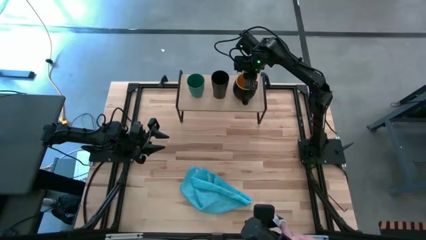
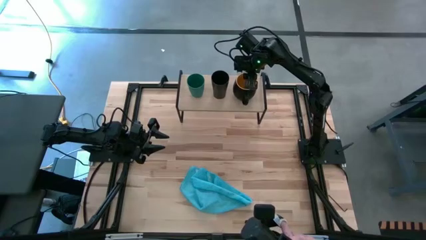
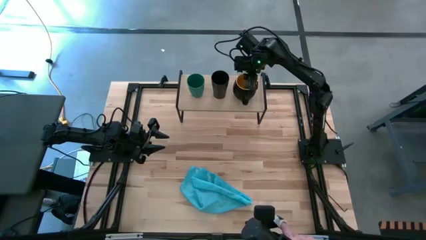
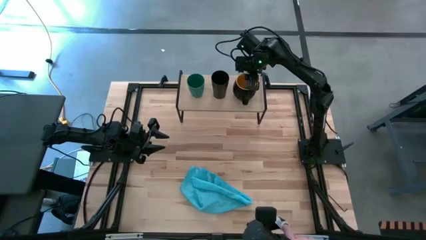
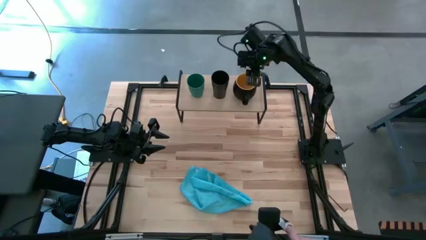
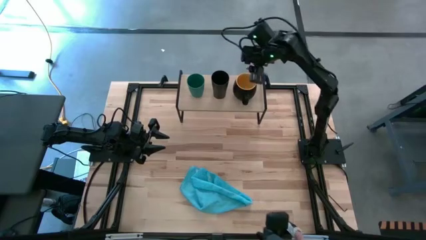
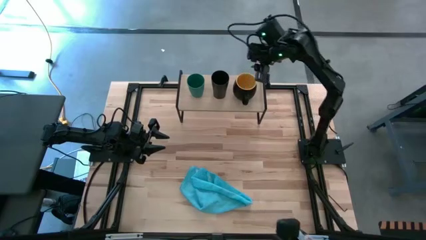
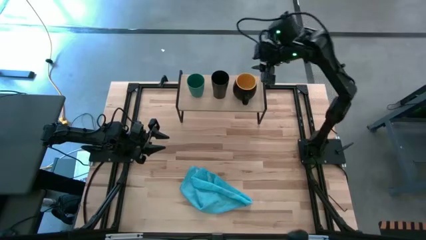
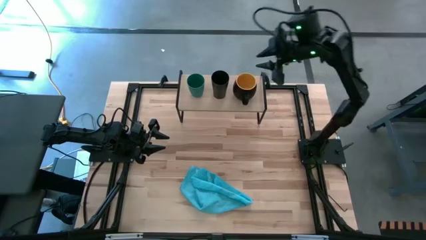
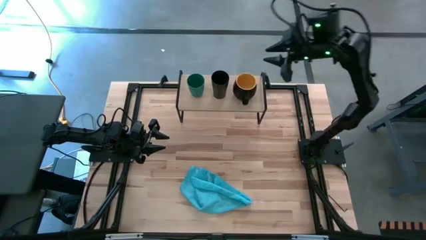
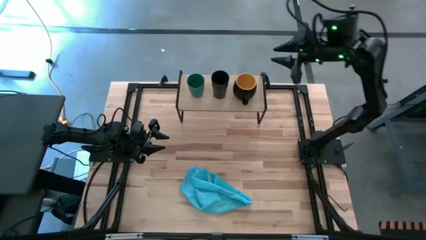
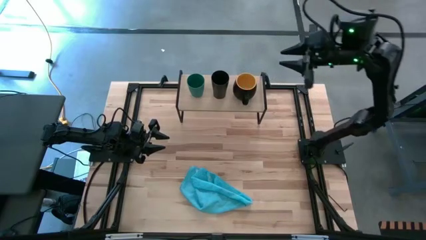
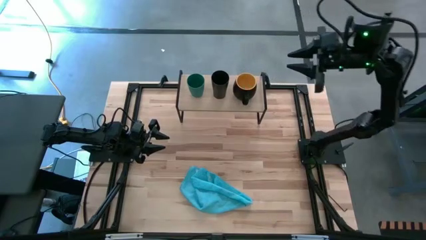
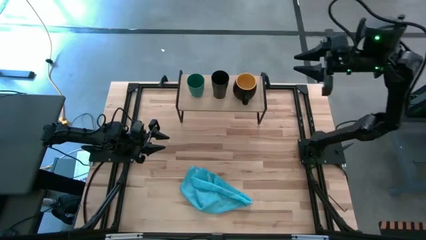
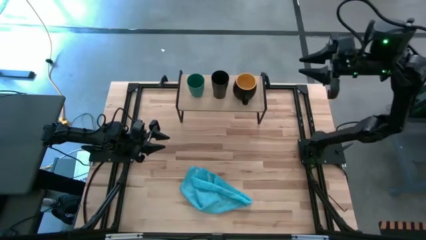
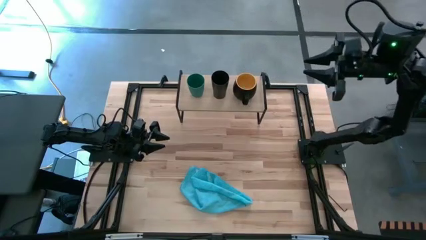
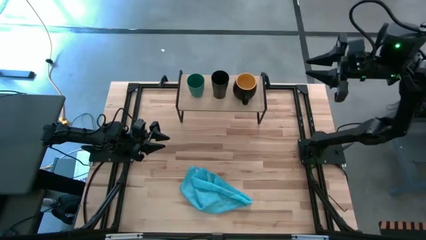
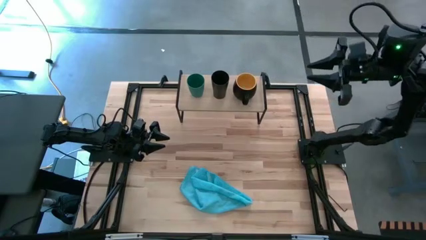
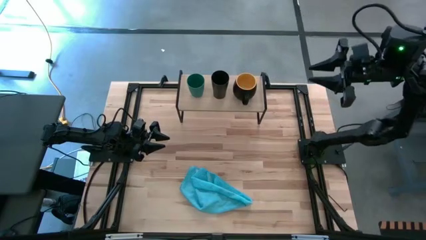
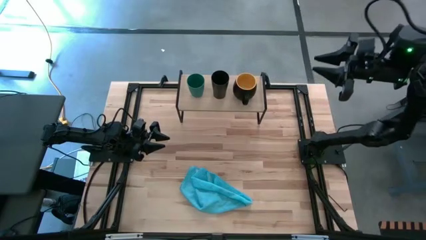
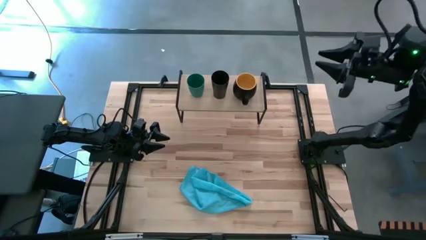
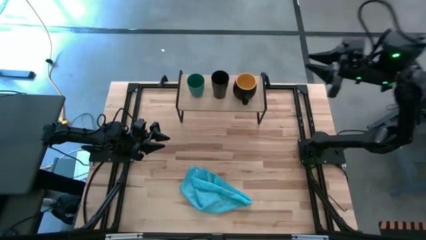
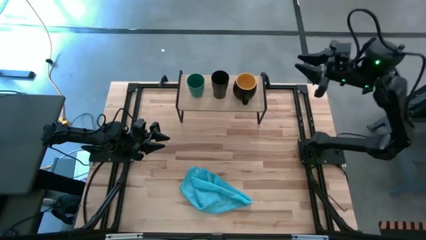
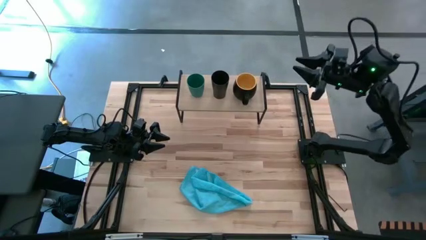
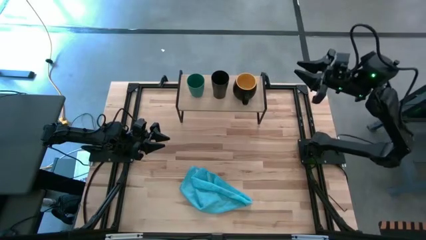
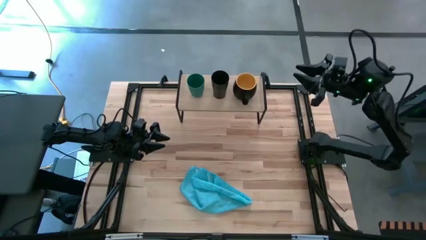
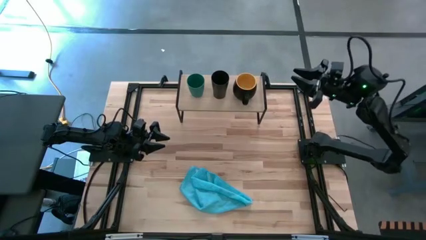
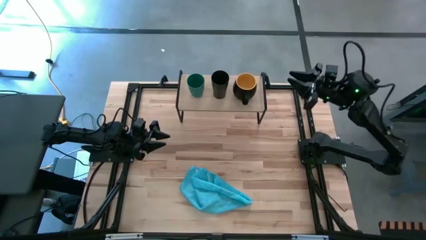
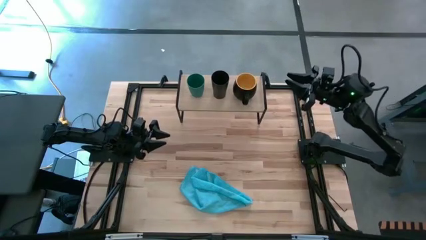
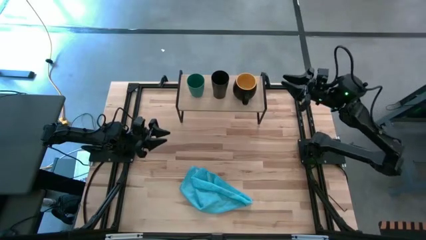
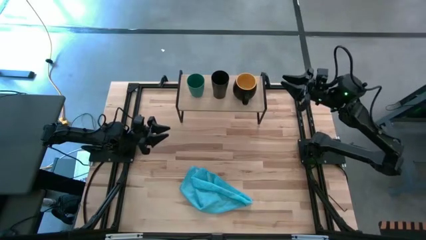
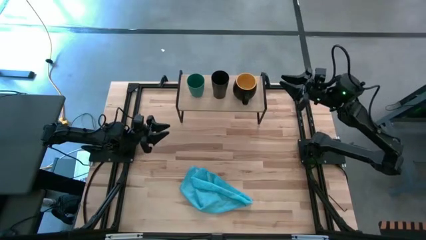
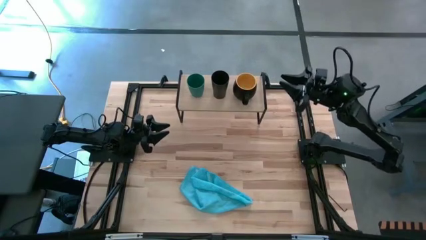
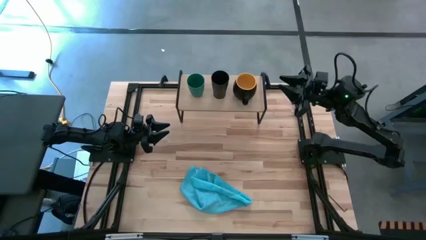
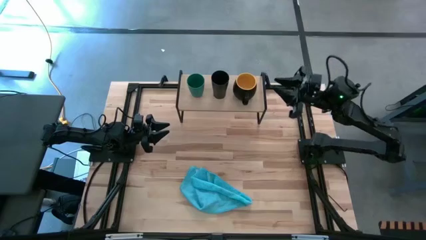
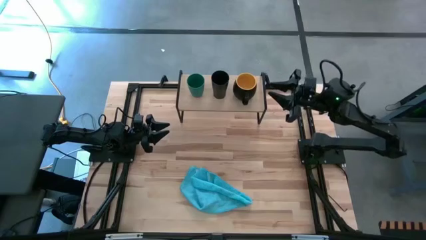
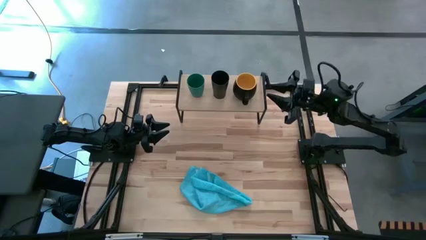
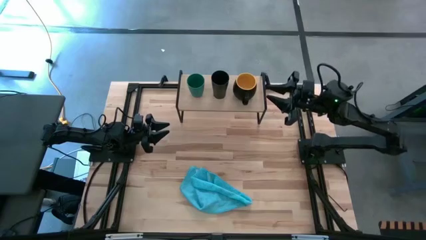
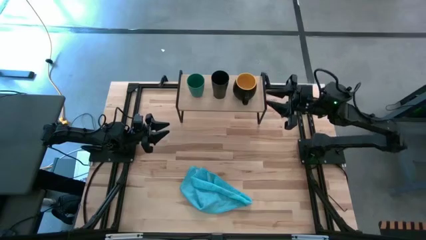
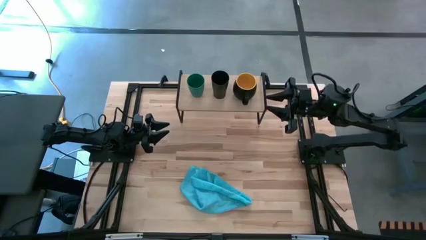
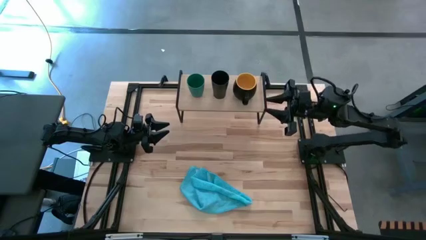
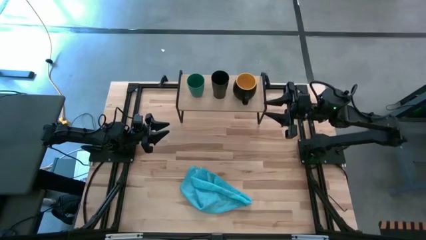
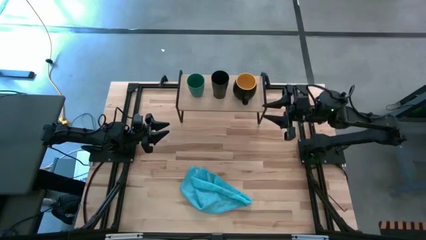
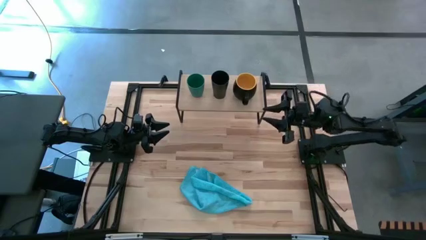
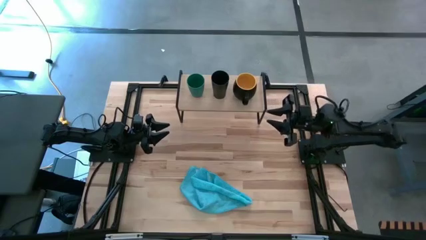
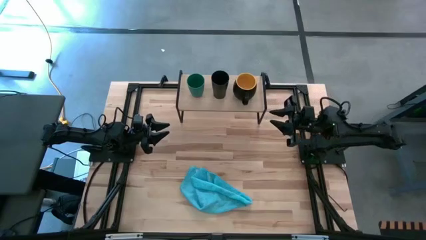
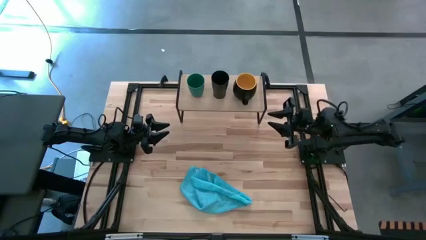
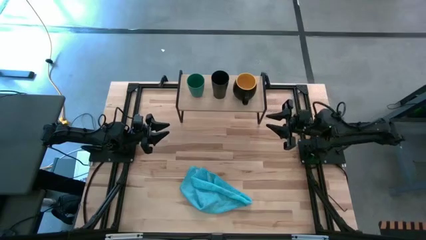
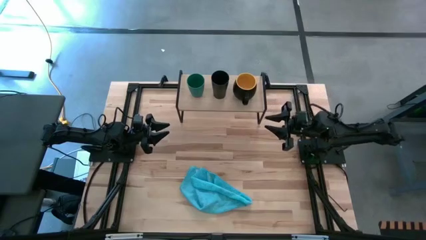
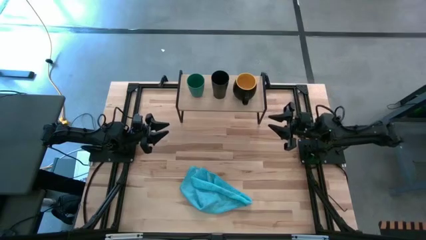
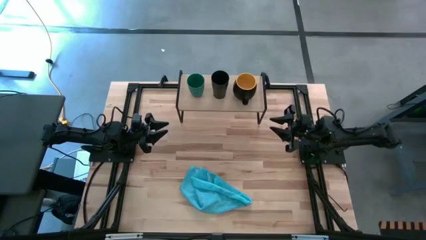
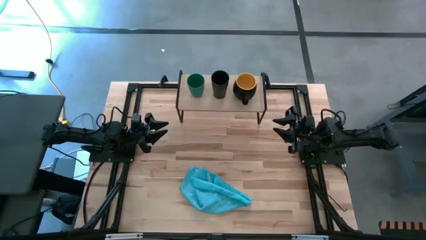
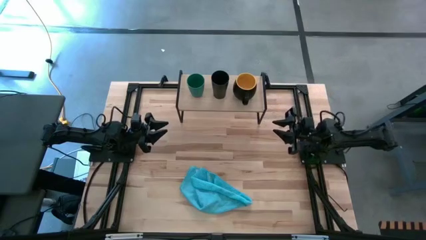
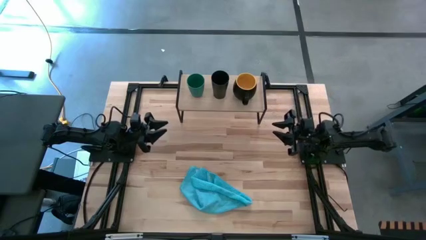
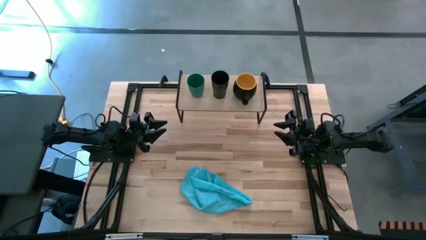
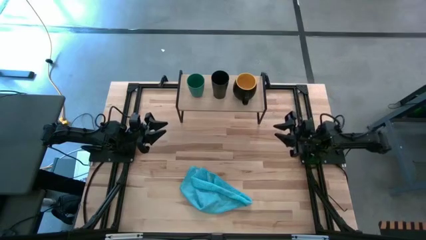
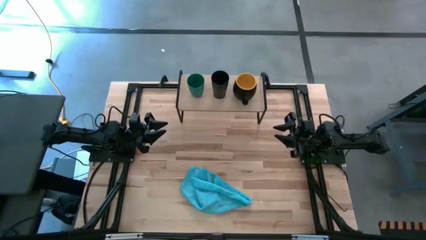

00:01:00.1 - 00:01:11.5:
Task: Stack small to large cups/mugs on shelf
Return to Home Position
